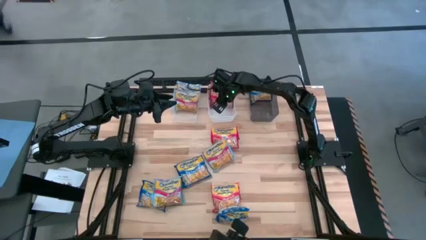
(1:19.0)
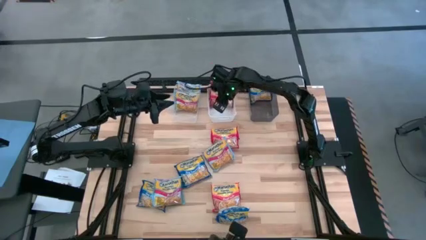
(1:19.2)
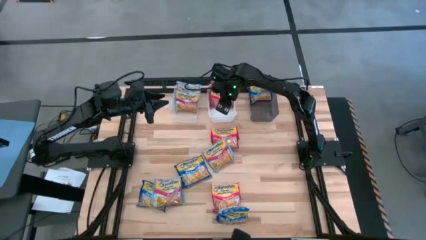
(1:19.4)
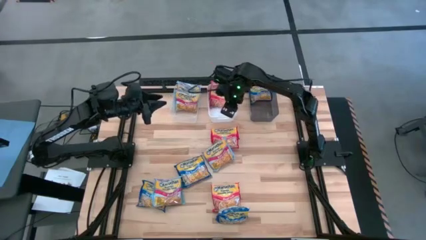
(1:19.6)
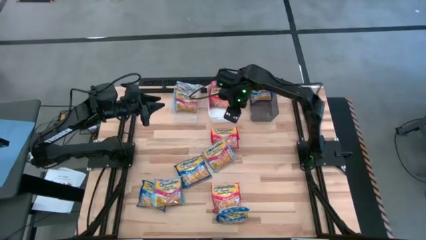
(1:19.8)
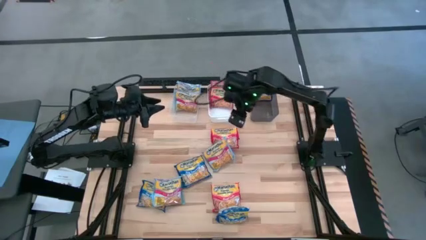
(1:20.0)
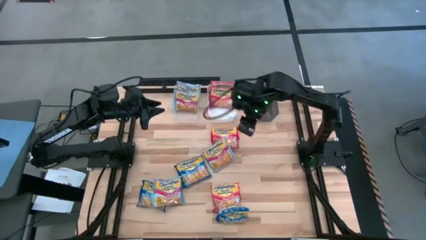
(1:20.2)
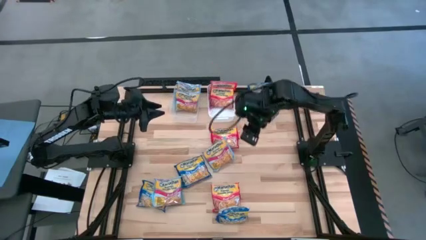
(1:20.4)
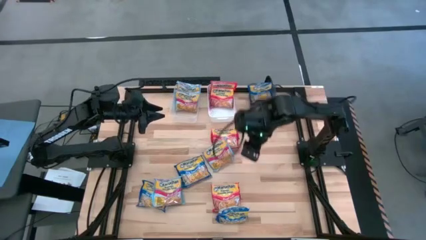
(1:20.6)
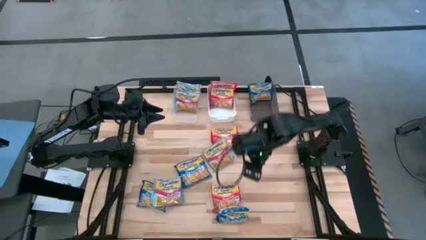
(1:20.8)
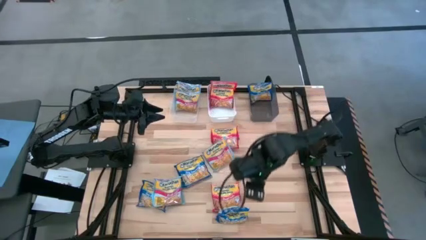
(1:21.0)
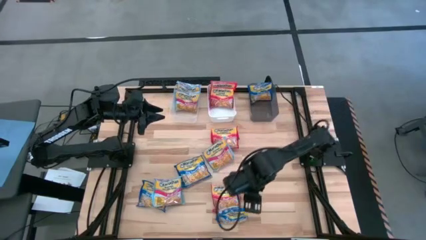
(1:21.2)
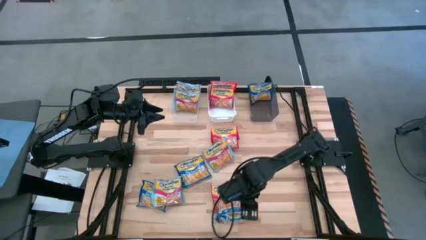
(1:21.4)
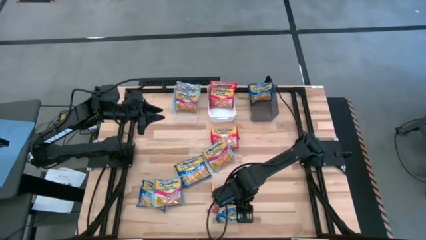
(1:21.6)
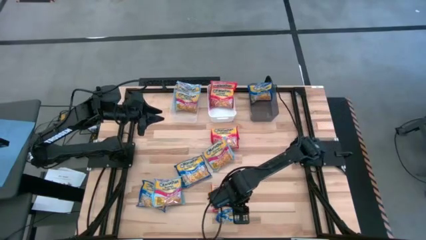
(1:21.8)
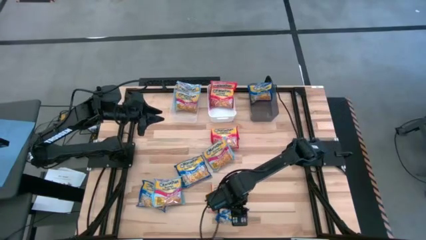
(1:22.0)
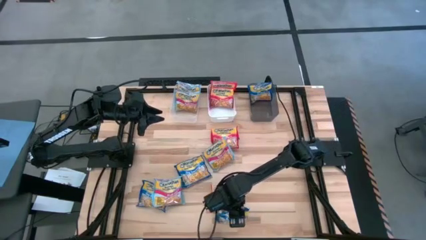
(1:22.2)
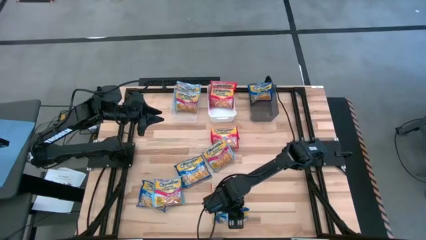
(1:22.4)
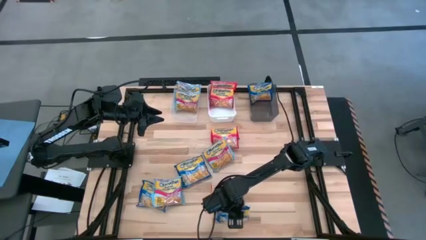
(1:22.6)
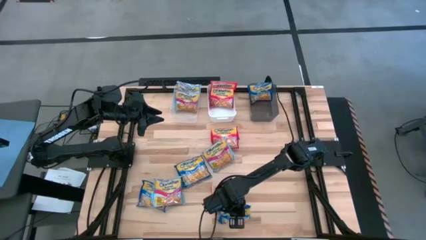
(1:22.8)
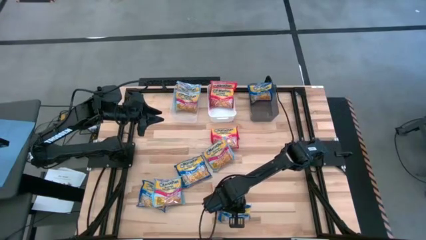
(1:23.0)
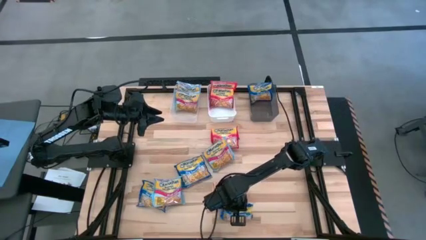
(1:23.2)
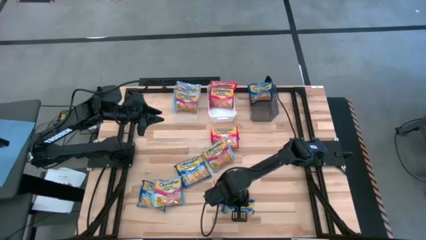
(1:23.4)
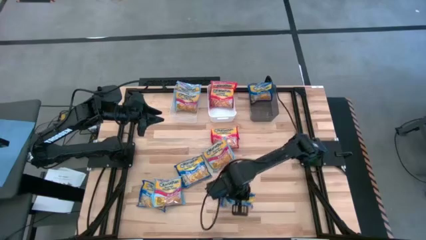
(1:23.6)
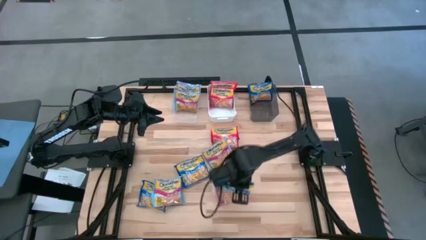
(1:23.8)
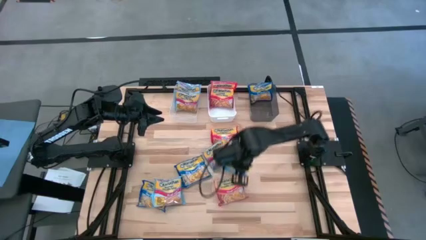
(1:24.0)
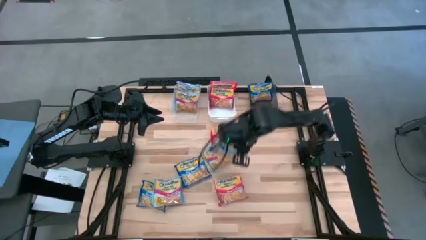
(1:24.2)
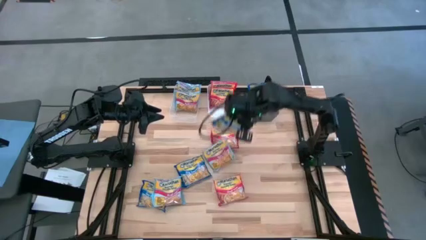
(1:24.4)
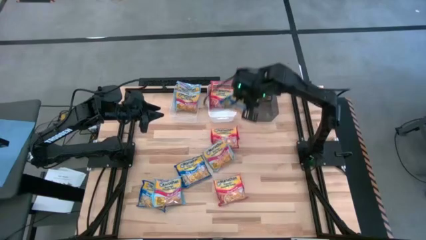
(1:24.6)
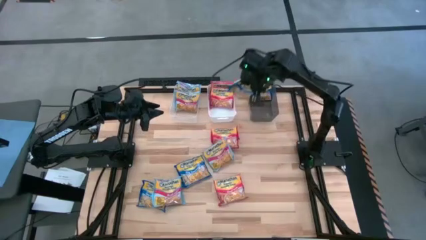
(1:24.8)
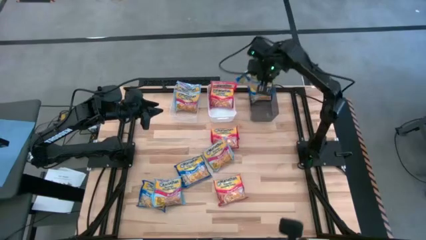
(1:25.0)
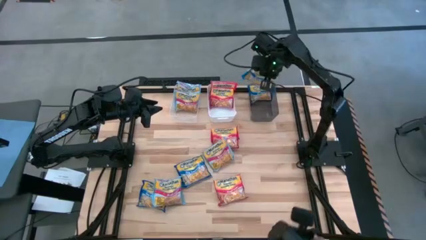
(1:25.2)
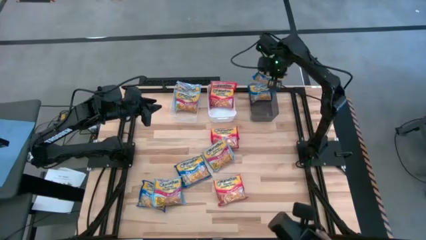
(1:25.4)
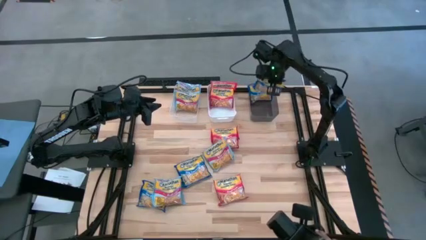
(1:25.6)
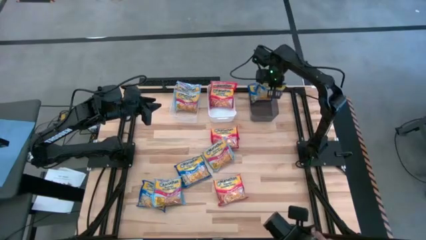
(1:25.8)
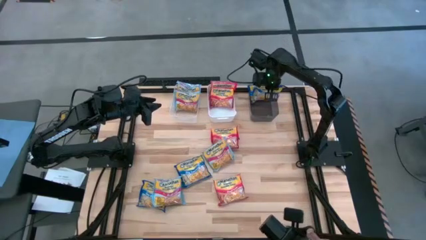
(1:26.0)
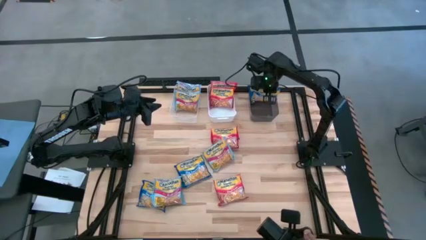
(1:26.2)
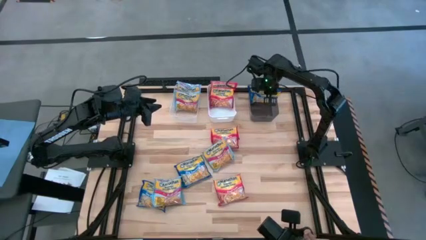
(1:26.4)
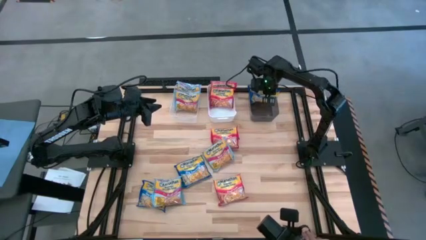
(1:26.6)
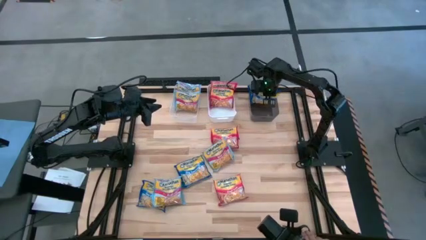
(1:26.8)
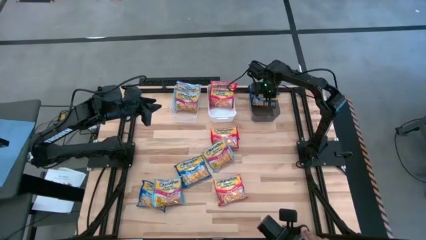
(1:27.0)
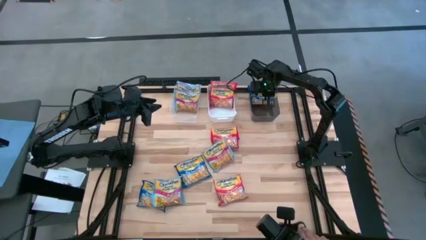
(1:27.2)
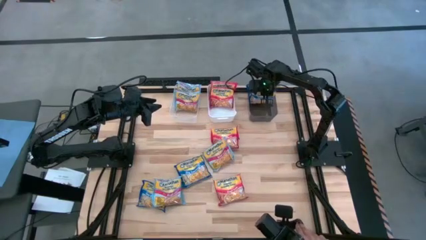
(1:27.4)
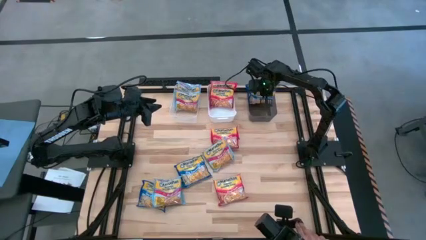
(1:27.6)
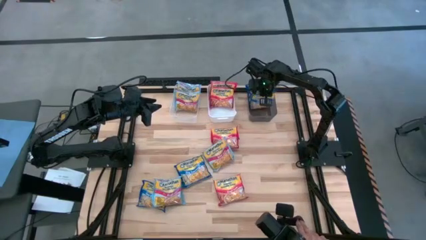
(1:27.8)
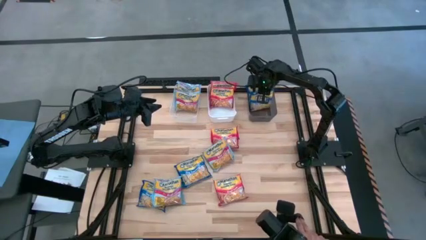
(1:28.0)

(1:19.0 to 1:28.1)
Task: Sort Maruchan noodles
Put the blue bag into the black bin

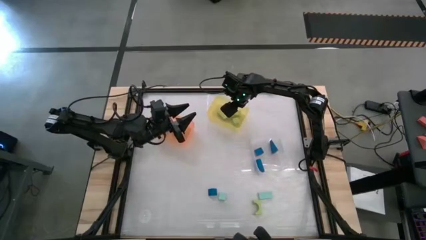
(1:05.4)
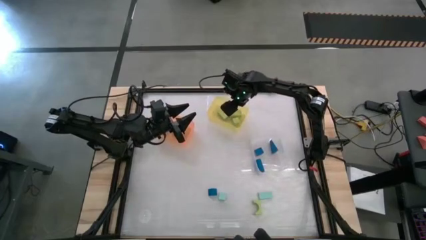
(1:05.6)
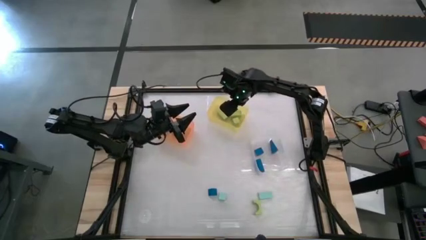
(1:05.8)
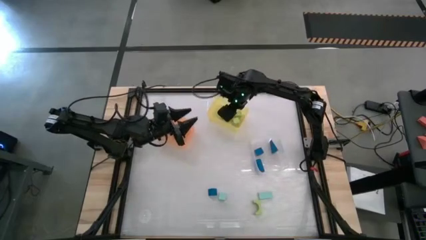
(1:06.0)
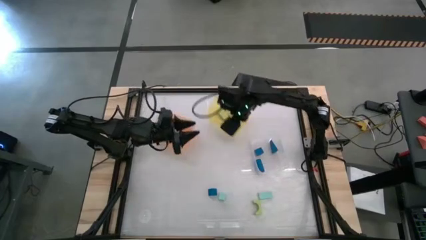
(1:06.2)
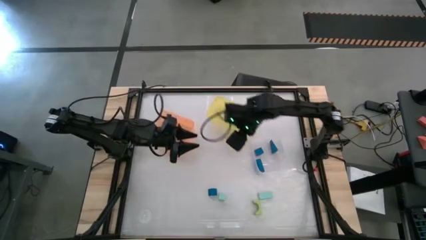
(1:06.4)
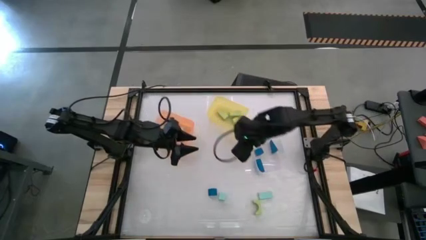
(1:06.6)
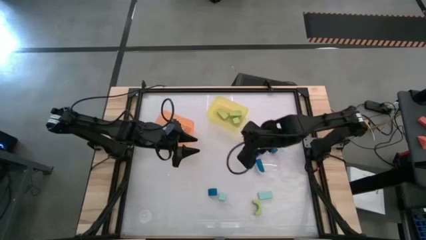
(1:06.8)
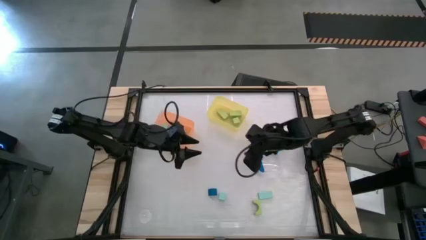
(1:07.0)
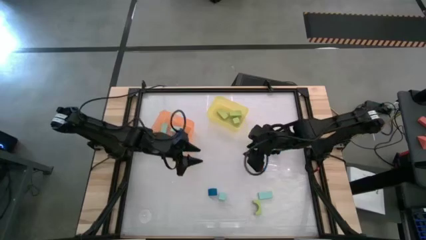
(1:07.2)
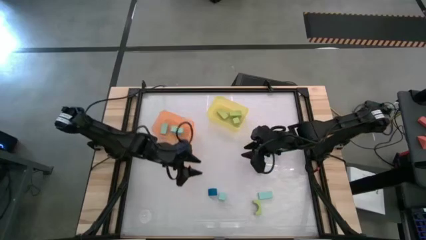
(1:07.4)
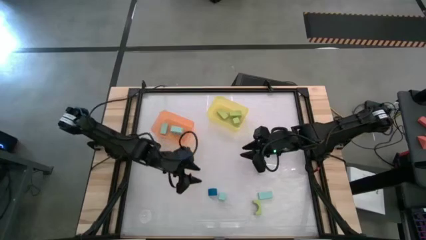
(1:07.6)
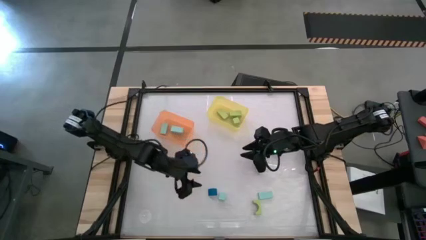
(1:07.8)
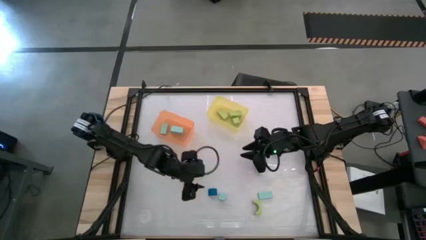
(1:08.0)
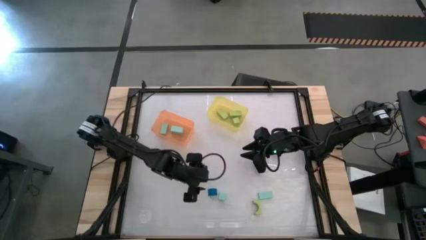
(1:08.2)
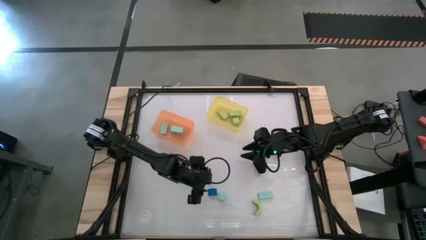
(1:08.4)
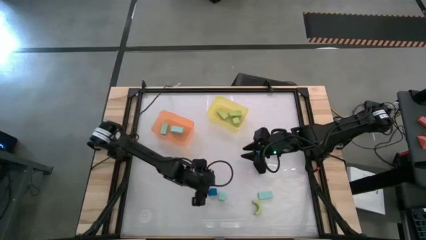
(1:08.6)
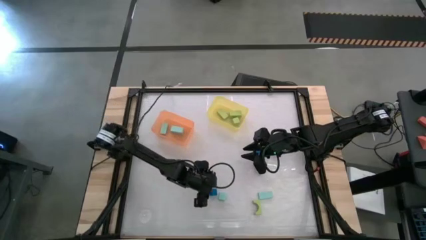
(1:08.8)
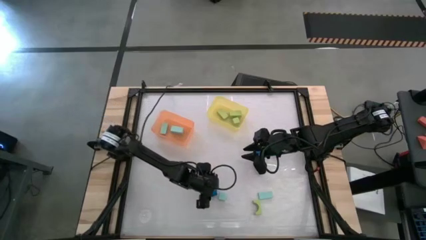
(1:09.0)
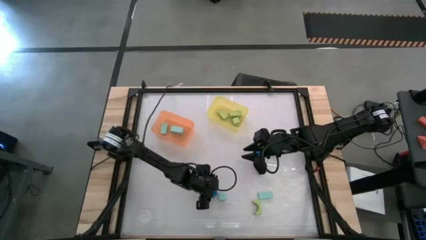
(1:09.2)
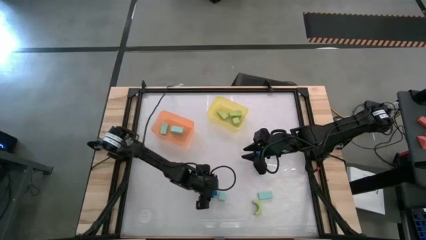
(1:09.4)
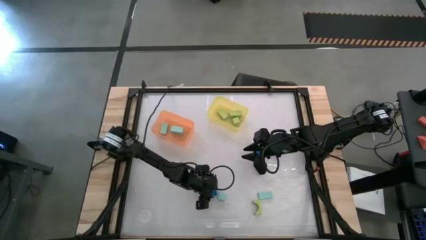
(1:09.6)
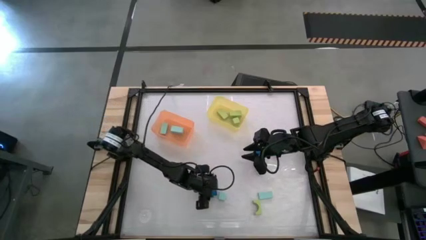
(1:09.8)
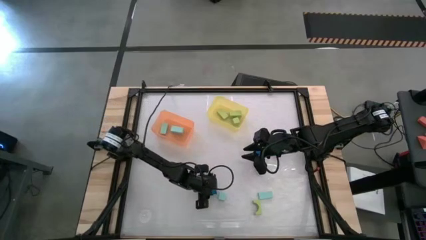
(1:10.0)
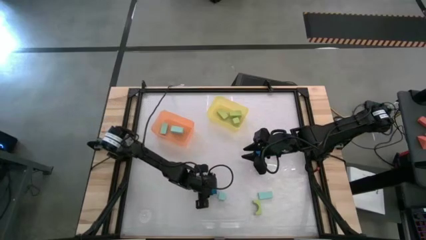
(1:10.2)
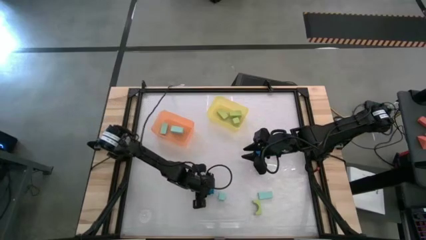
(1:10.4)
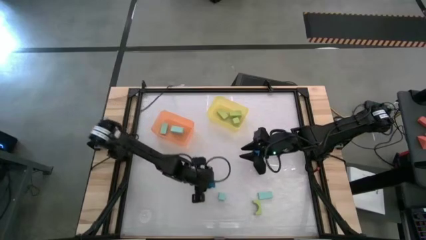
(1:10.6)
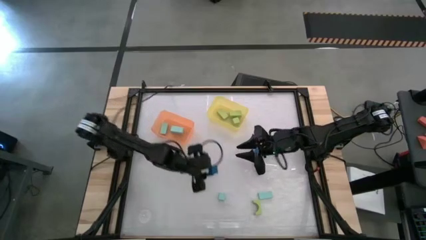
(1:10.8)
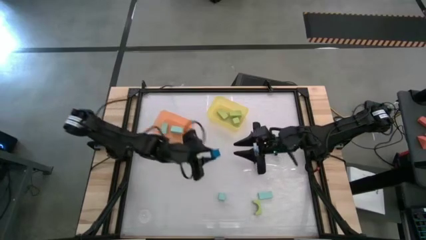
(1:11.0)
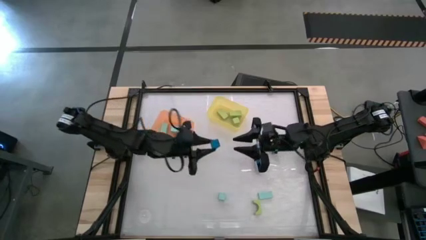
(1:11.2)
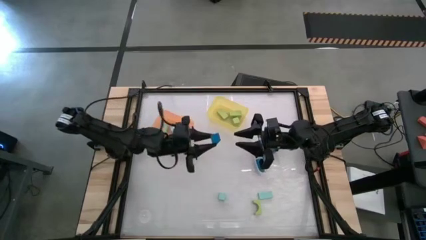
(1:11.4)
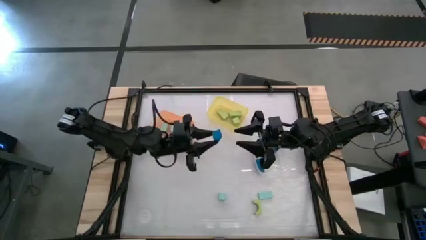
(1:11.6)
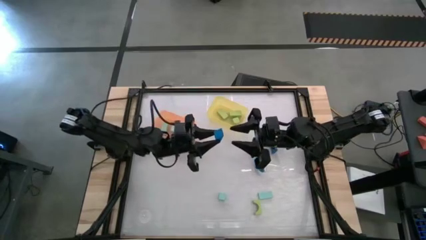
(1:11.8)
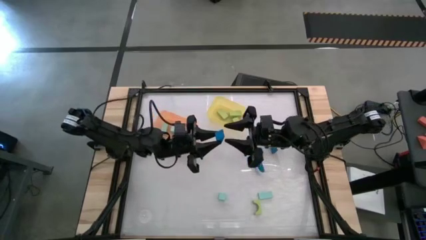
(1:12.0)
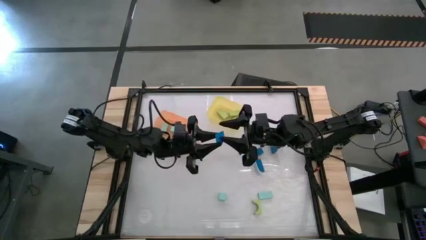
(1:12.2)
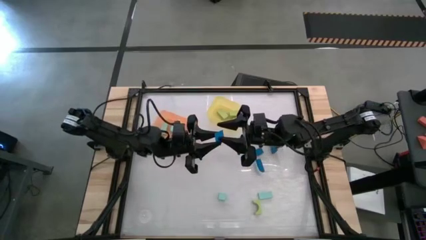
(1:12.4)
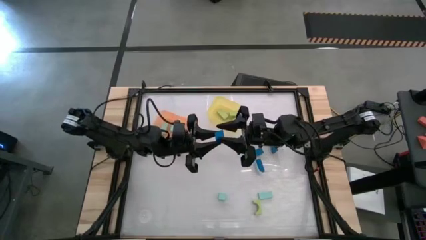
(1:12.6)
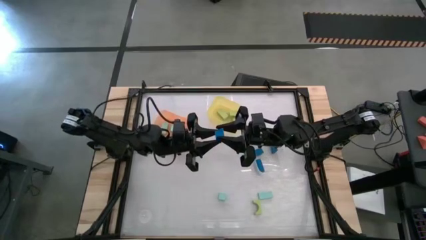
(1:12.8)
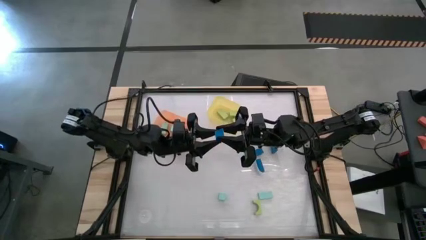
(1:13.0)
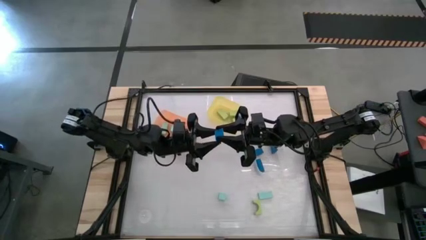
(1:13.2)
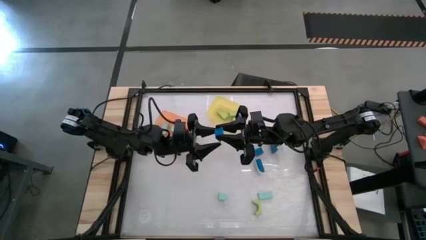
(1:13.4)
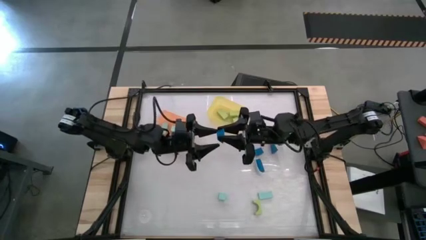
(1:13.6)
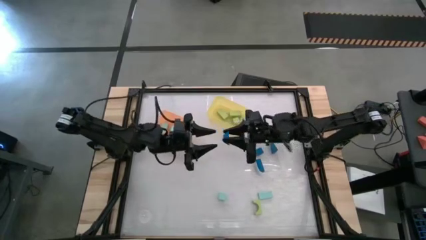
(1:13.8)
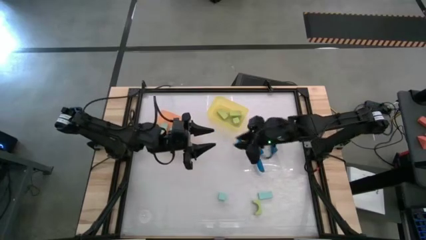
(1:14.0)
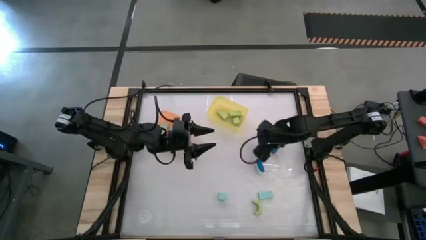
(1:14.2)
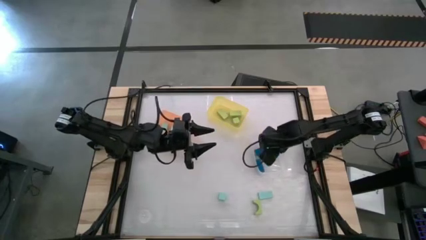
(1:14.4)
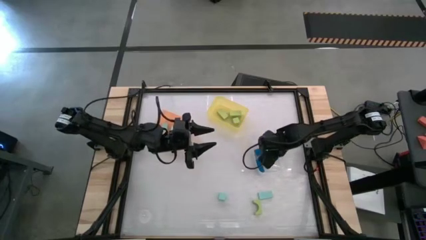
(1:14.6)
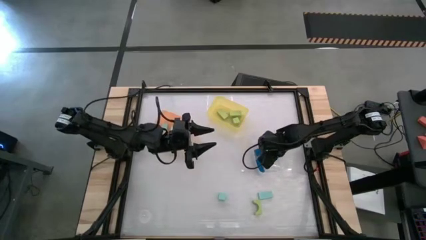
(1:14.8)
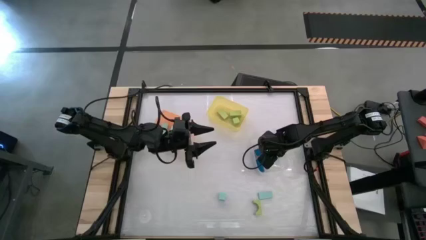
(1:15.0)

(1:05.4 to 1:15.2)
Task: Sort & place blocks by color
Put the blue block into the transparent bin
